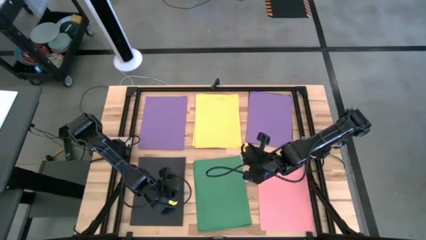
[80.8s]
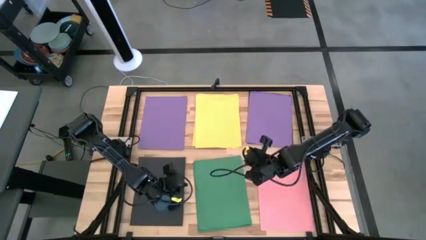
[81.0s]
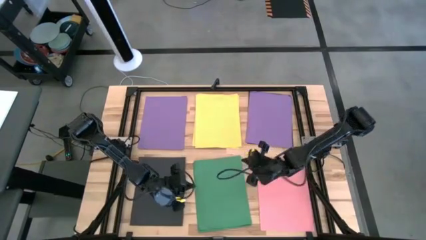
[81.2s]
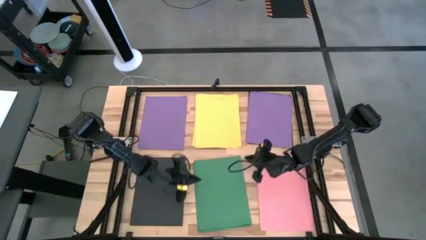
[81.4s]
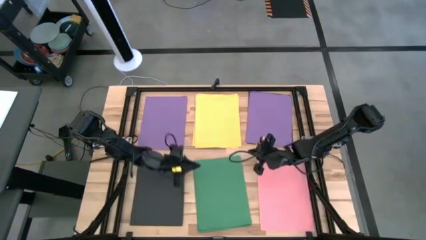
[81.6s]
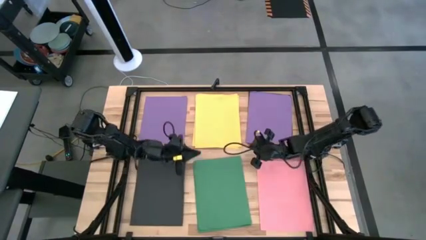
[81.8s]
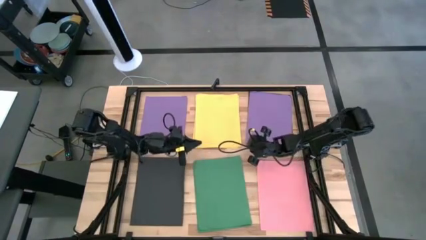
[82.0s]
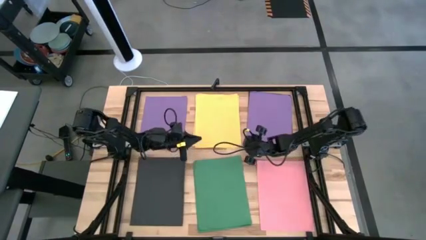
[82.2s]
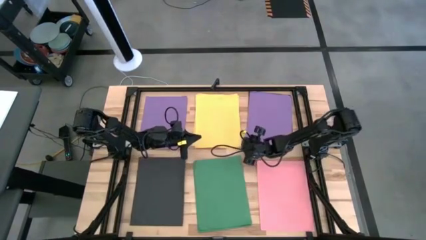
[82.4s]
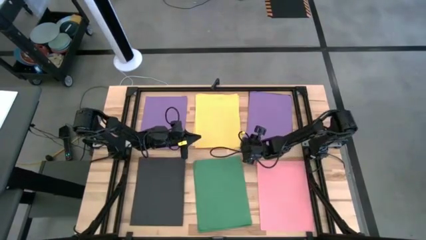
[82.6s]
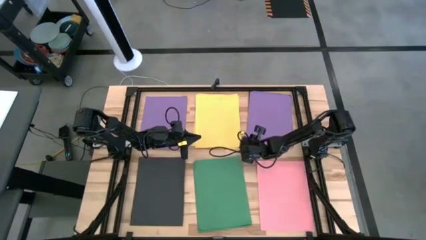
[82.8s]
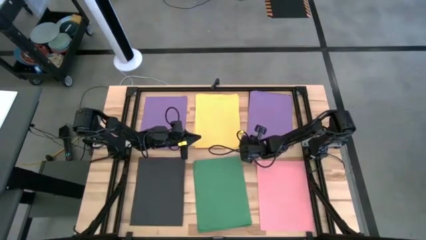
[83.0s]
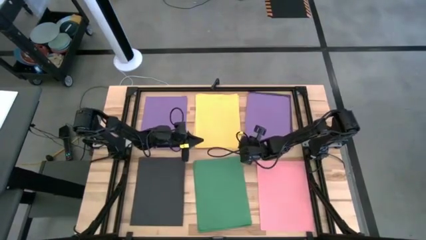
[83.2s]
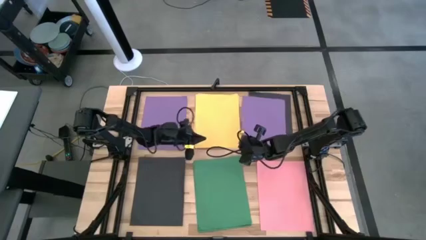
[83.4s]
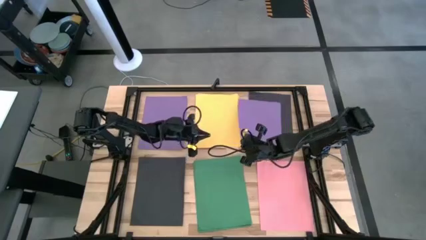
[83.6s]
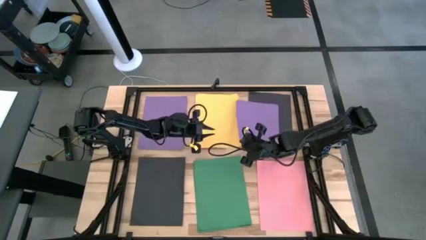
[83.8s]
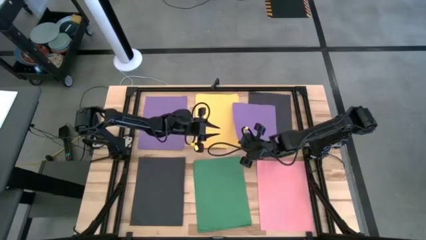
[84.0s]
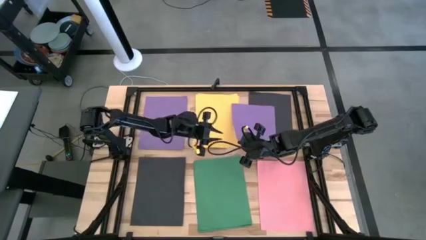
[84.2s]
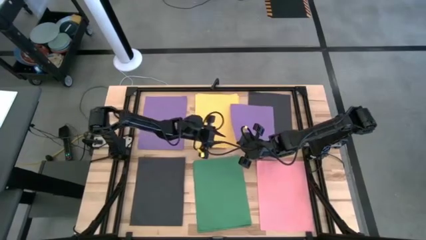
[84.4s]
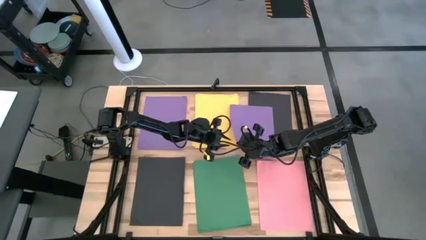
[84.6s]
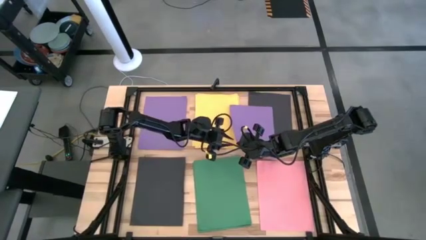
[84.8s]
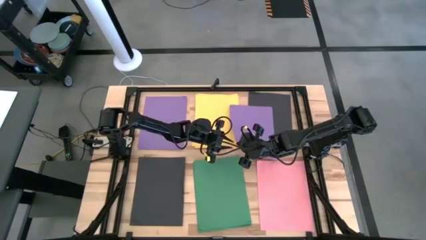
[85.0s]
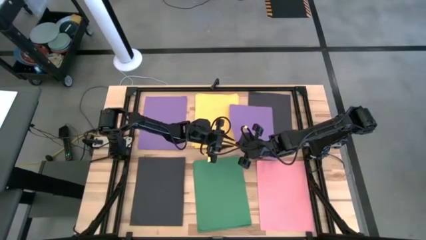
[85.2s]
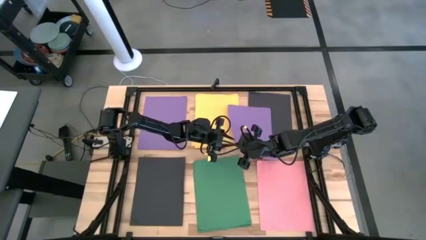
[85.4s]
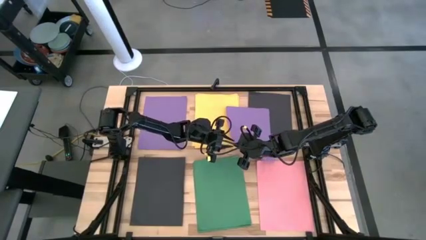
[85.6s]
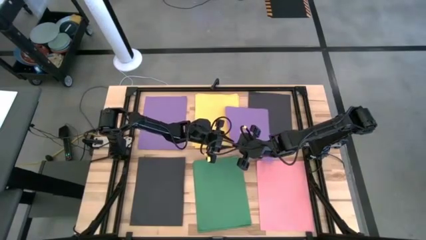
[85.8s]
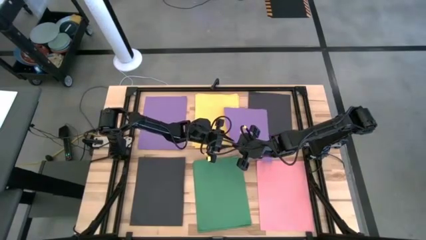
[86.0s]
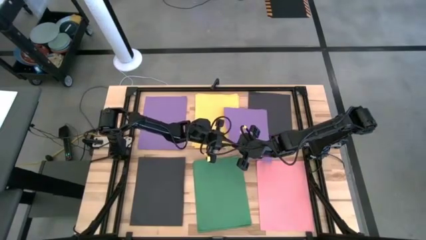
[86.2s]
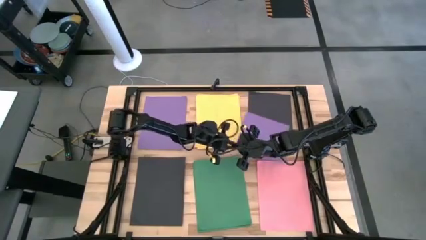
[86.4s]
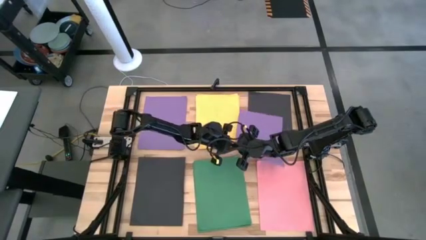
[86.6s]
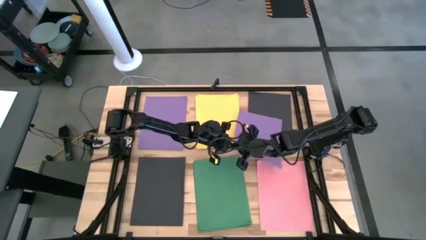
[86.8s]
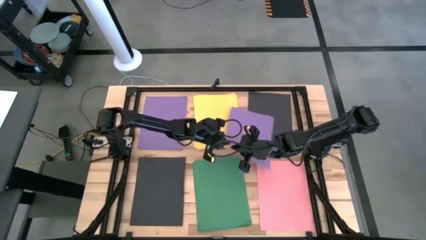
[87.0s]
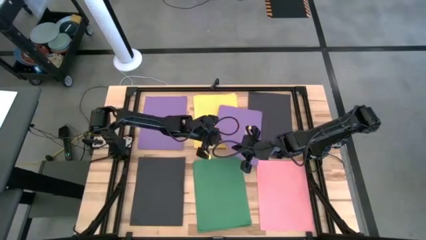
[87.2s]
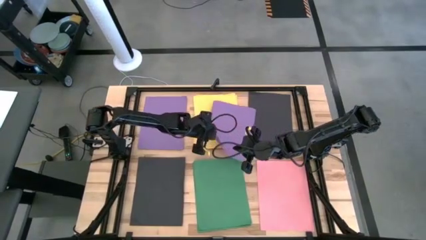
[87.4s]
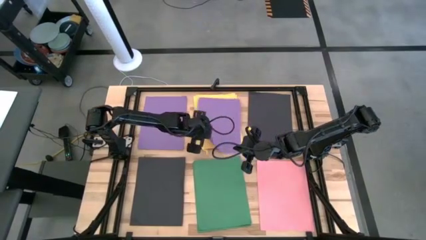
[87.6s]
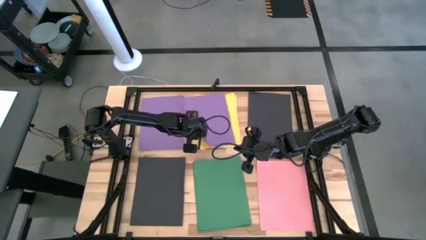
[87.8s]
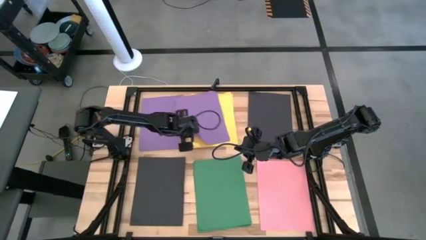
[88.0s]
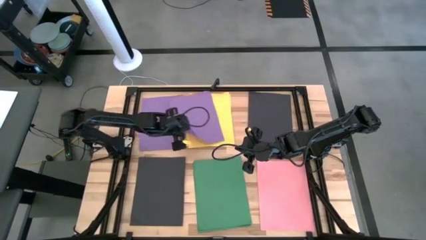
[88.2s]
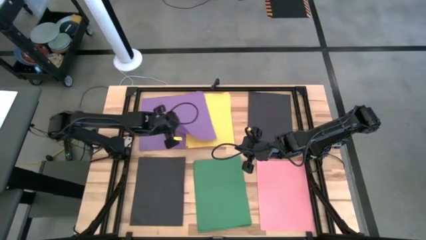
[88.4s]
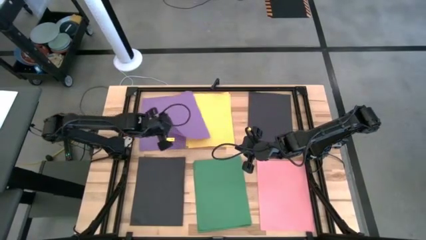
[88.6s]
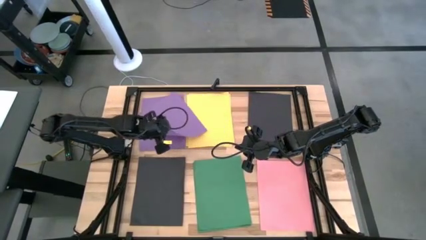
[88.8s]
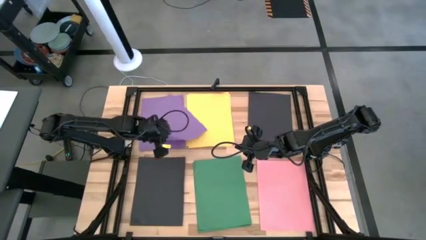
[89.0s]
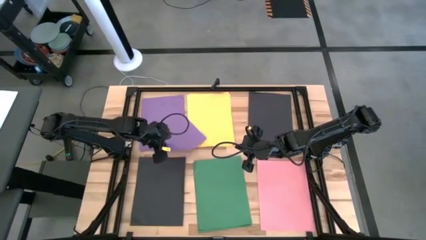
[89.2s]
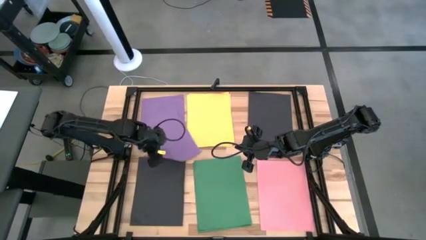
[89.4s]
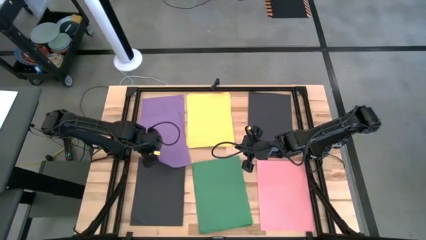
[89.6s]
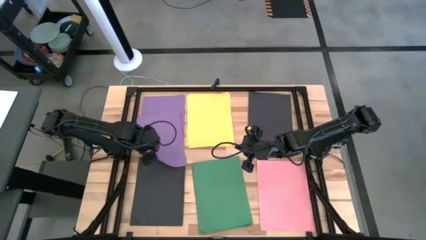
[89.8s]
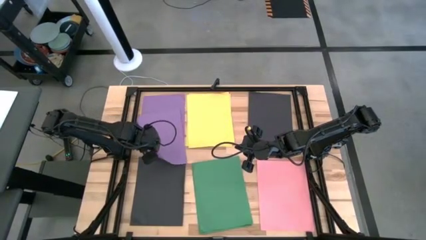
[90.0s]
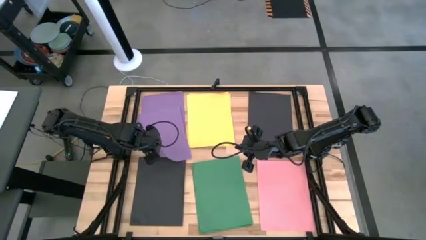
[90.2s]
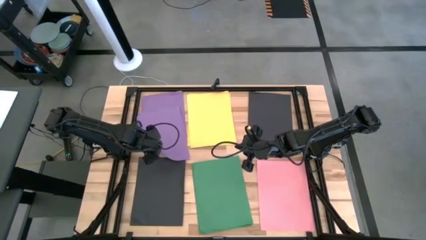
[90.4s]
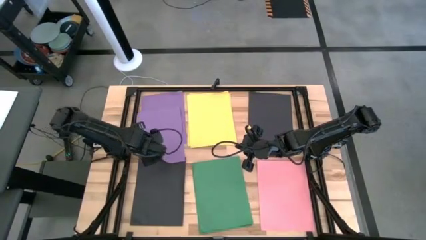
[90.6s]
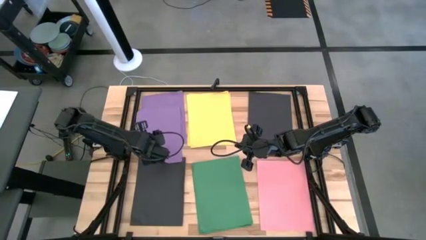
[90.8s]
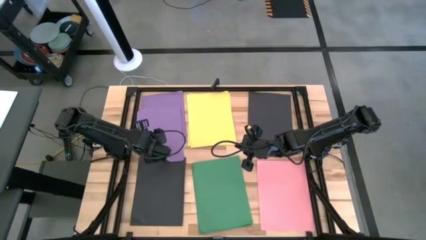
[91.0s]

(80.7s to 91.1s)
Task: Organize paper
Stack the purple paper on top of the purple paper

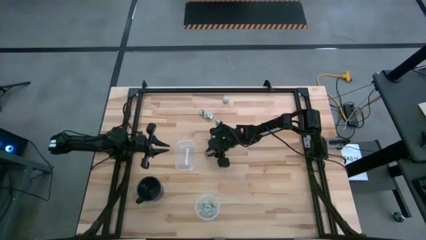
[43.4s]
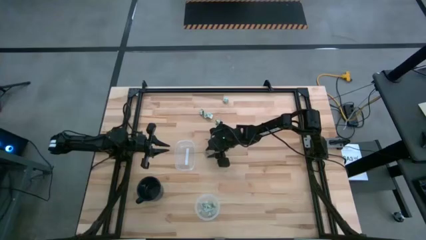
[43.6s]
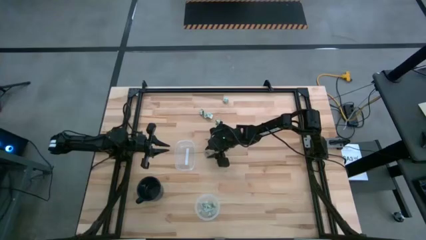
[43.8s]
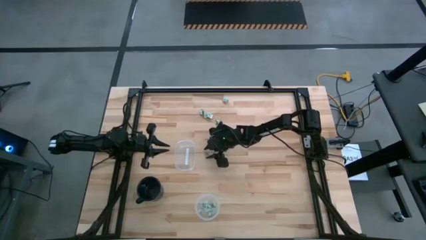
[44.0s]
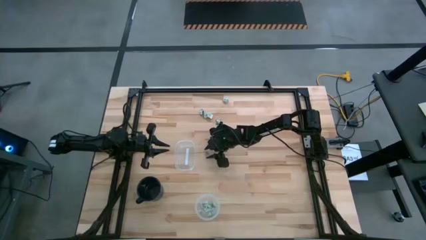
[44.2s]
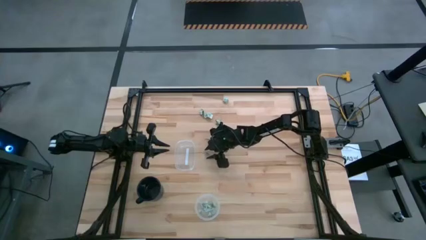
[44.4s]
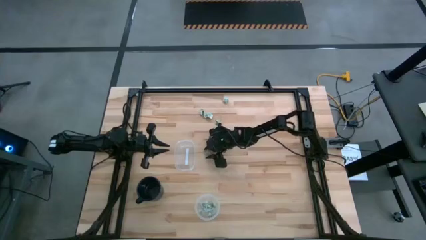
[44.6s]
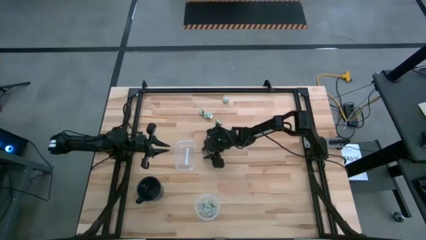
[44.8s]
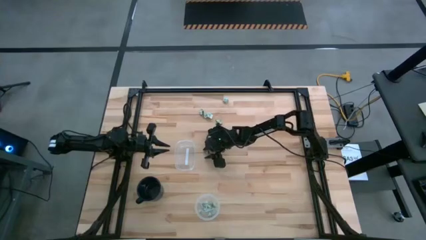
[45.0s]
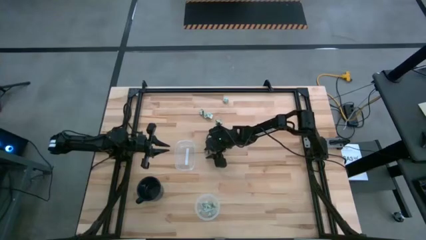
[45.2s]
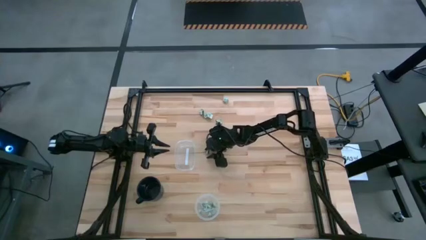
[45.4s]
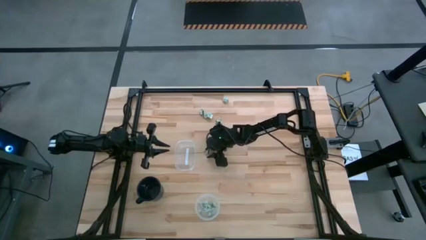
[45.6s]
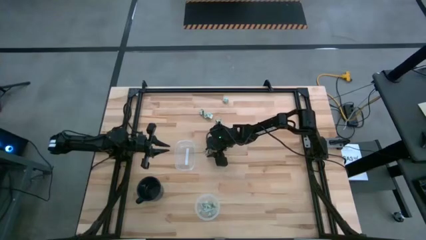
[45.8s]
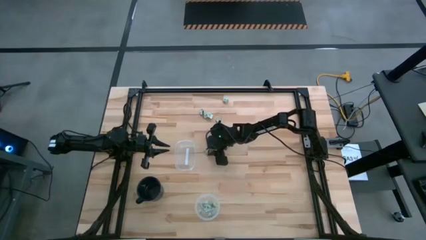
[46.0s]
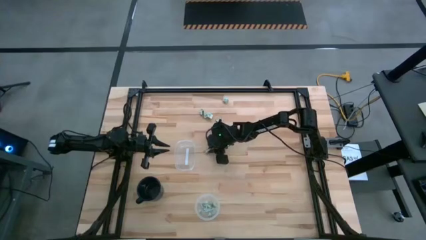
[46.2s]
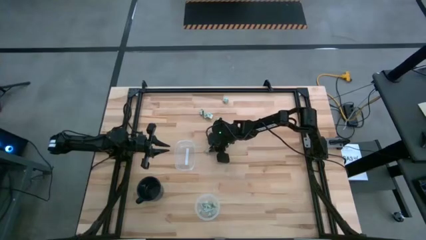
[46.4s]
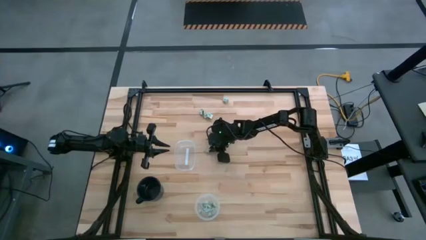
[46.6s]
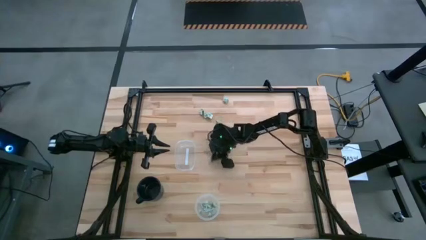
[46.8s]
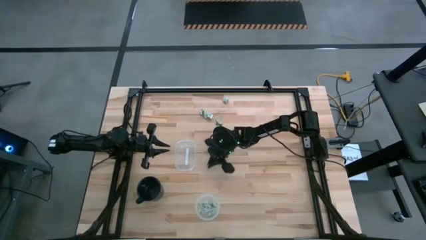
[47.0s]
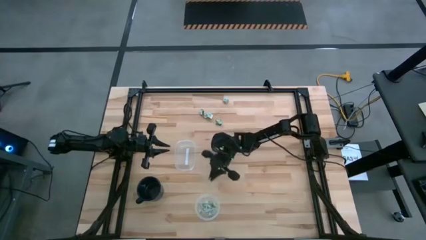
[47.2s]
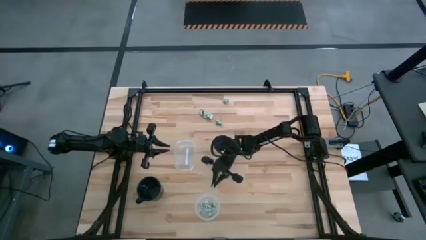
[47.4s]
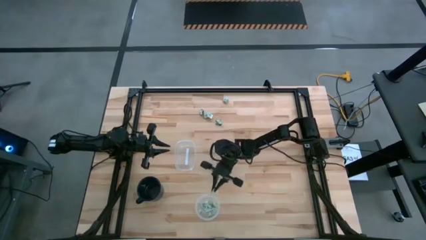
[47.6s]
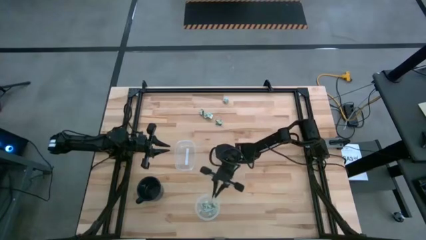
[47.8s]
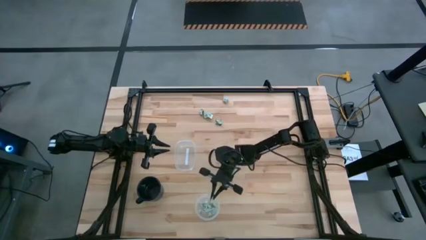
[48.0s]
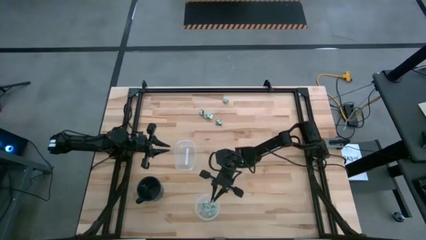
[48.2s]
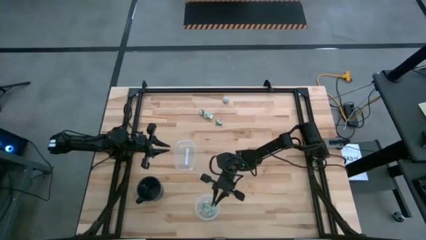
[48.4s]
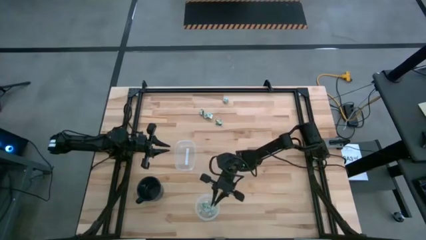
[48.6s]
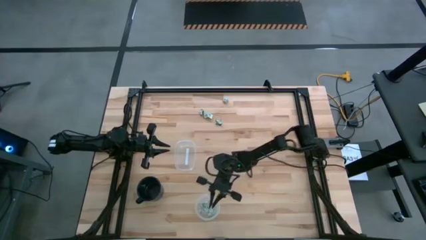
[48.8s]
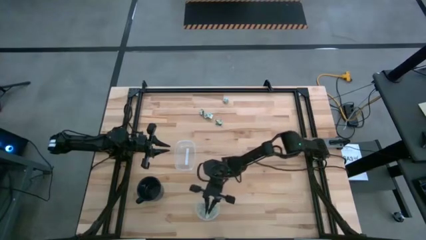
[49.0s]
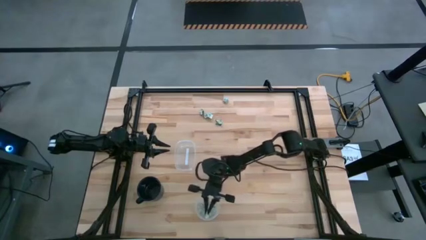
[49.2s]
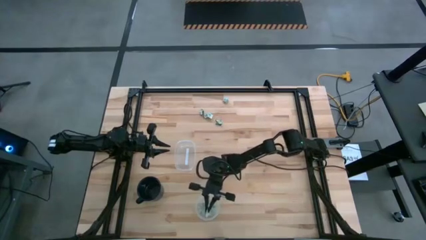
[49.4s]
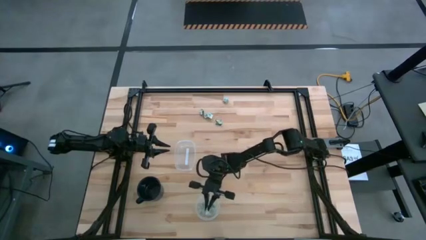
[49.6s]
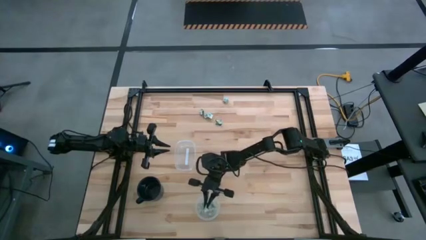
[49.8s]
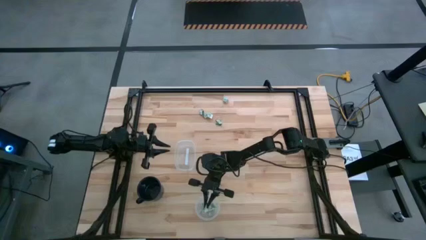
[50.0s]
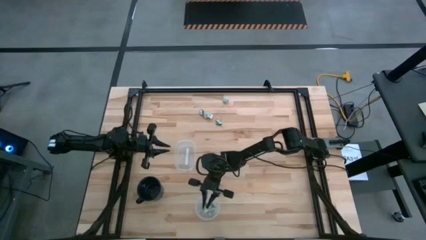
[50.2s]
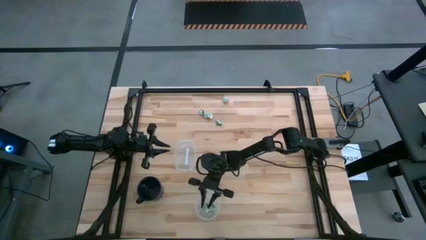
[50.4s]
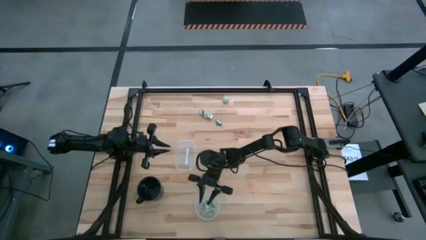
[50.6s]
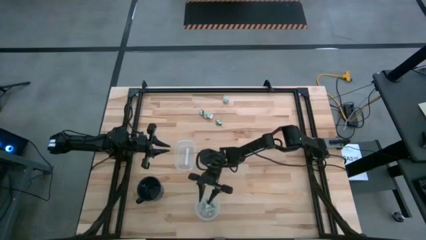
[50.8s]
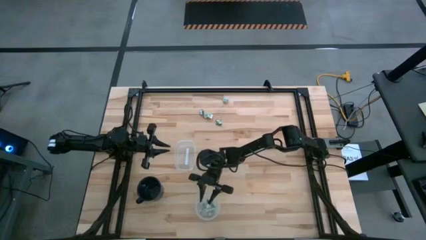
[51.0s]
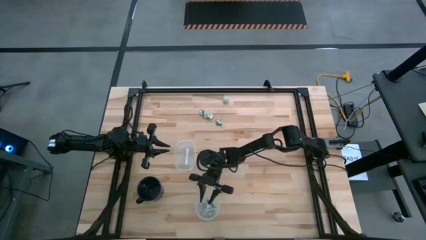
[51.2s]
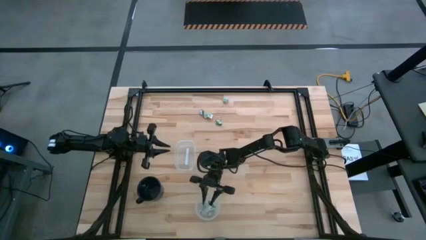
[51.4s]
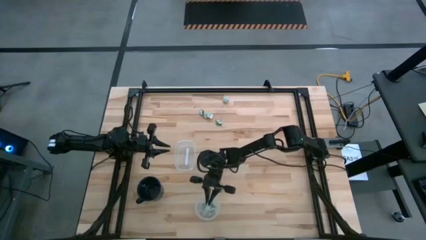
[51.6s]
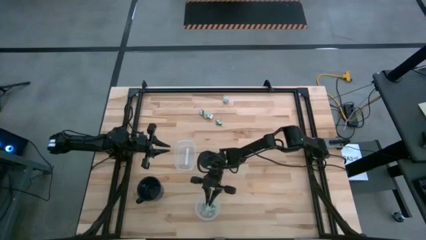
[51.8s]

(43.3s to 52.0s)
Task: Pick and place Stevia / Truvia into bins
Put the stevia packet into the round transparent container
